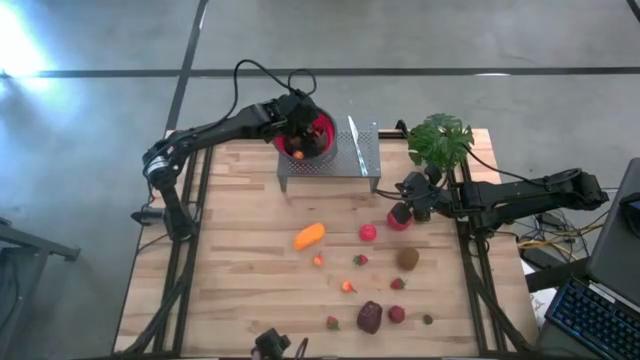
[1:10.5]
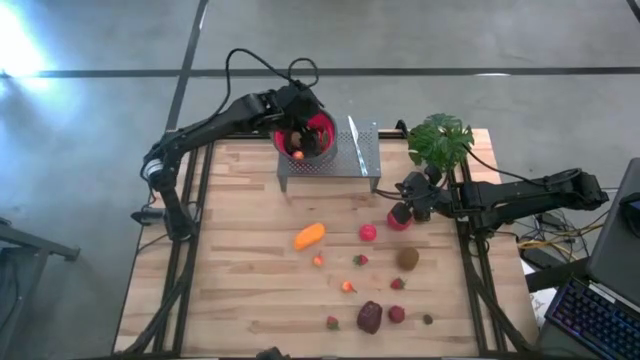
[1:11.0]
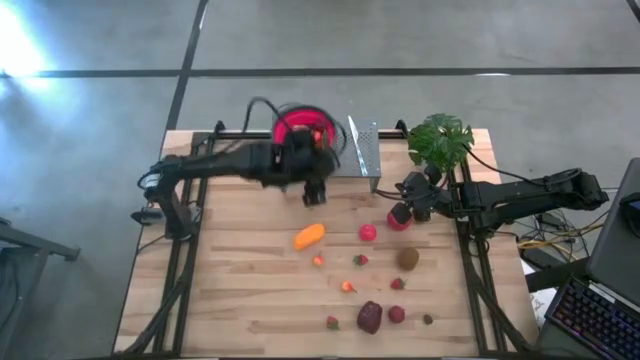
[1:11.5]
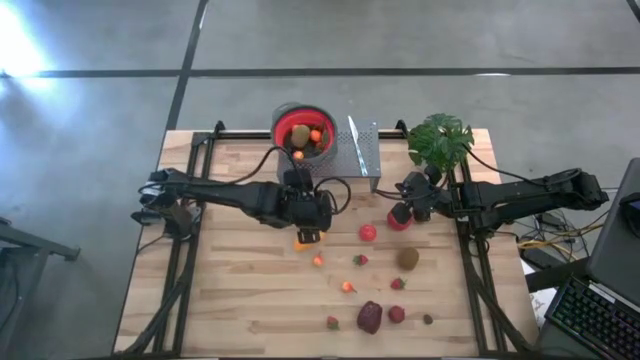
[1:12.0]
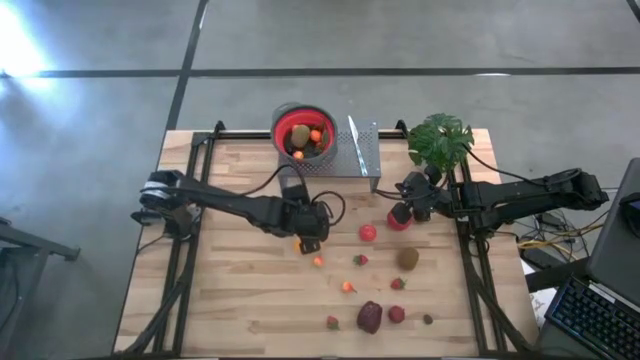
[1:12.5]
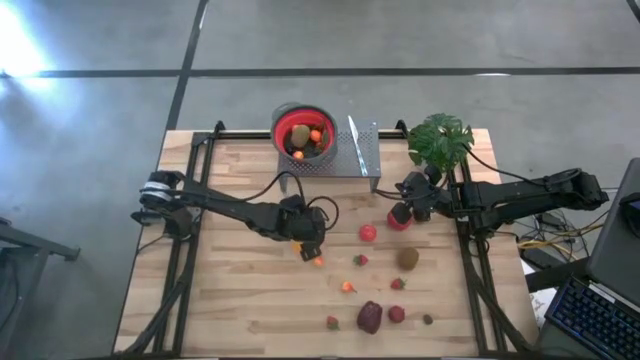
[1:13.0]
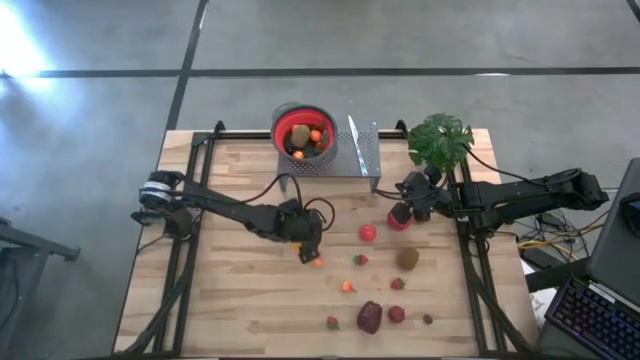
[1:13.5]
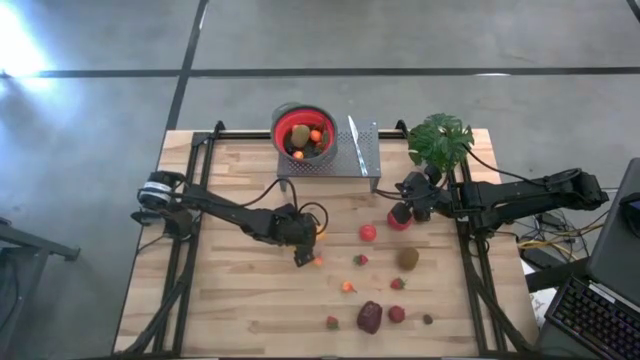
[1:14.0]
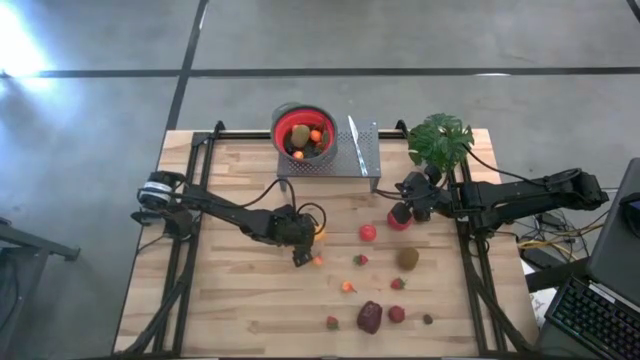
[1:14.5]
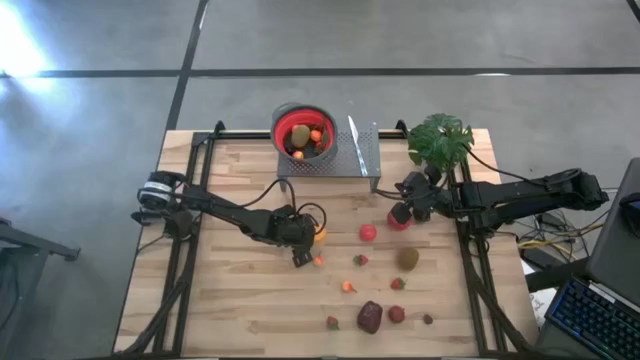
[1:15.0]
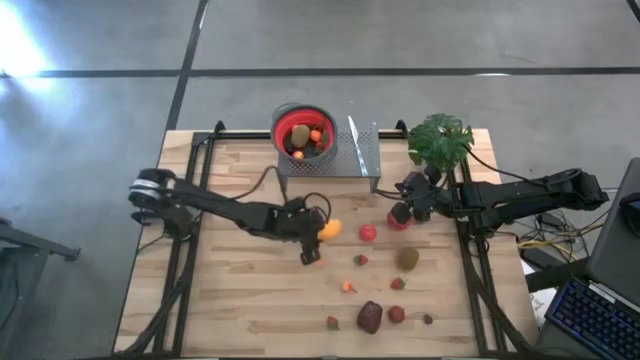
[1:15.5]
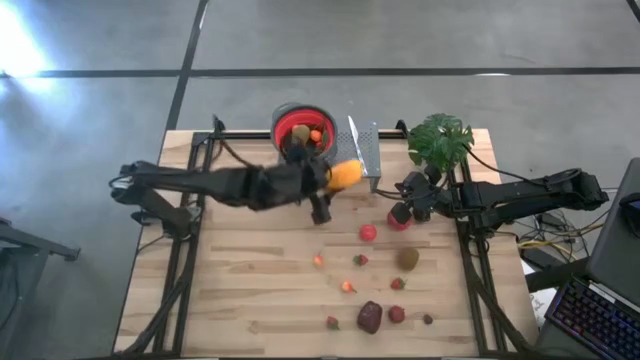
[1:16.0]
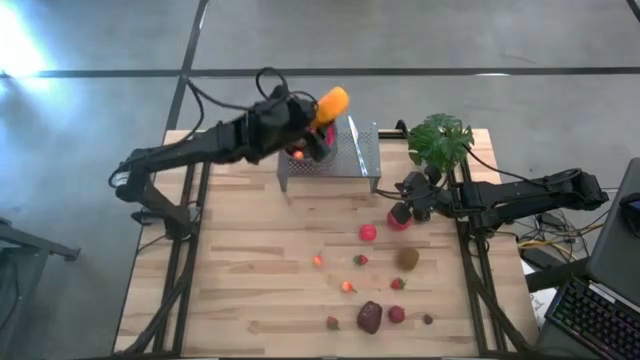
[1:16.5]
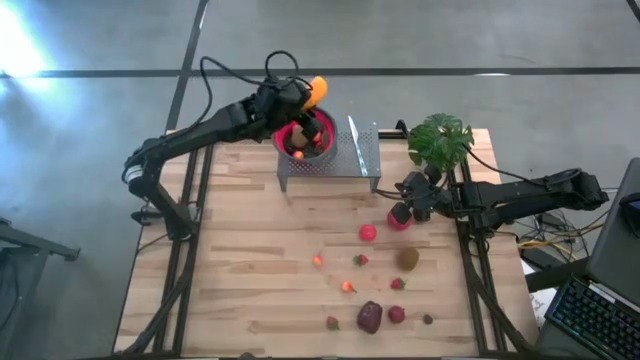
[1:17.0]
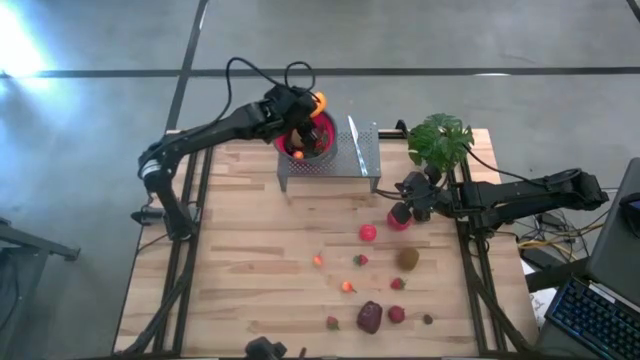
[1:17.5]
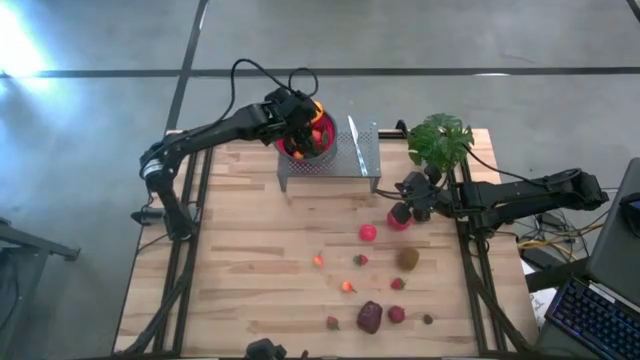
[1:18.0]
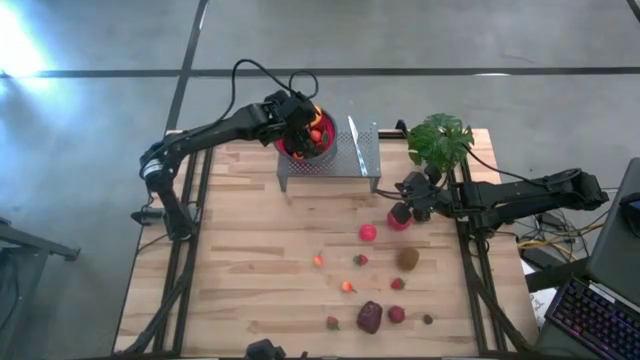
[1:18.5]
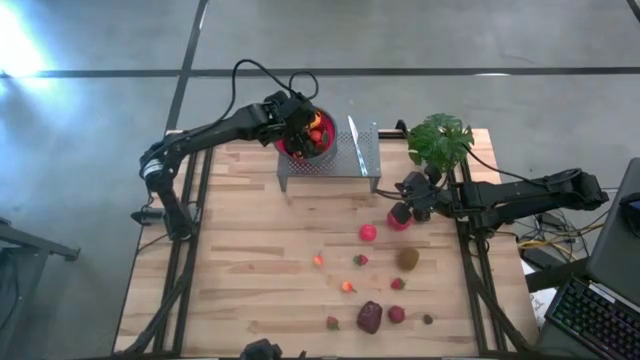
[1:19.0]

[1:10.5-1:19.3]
Task: Pick & Place Fruit
Put the yellow mango into the red strainer bowl on the shelf

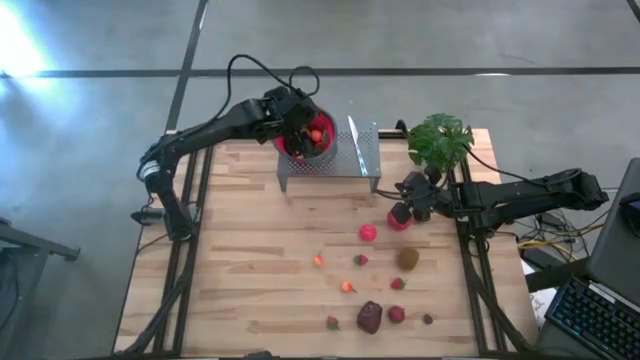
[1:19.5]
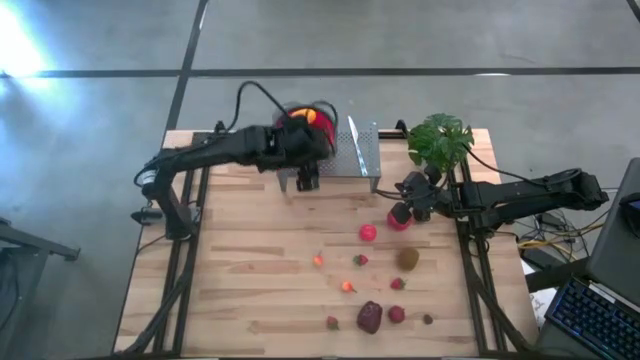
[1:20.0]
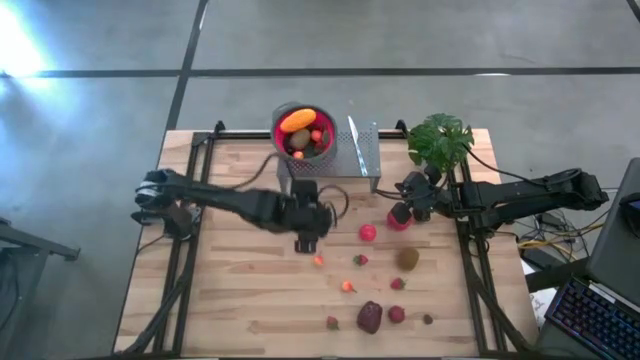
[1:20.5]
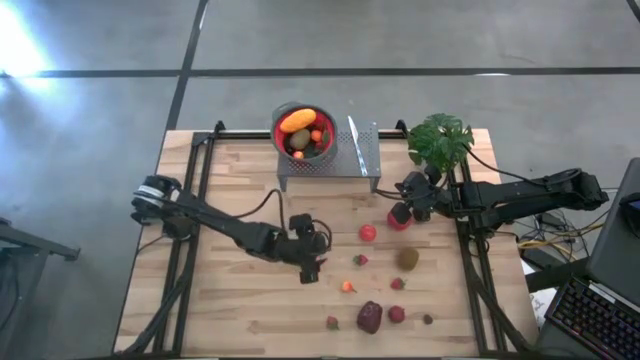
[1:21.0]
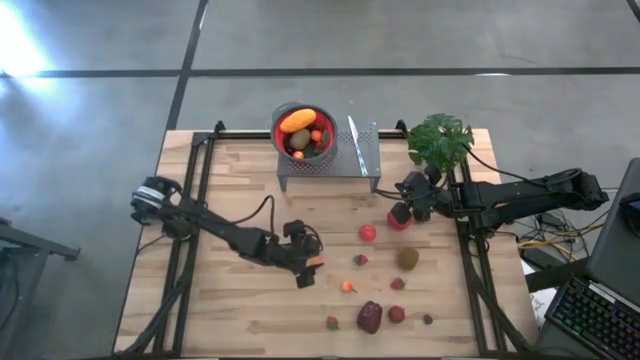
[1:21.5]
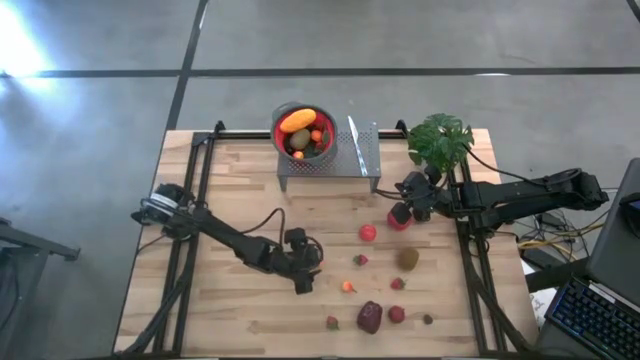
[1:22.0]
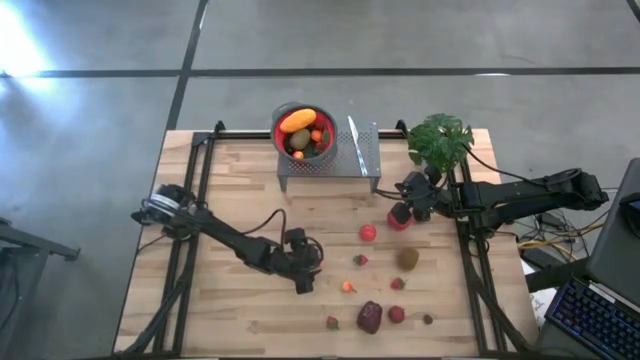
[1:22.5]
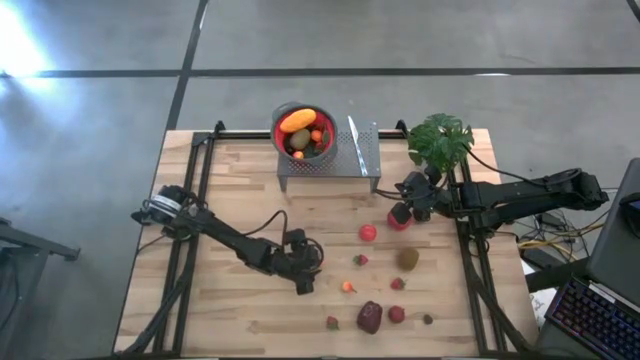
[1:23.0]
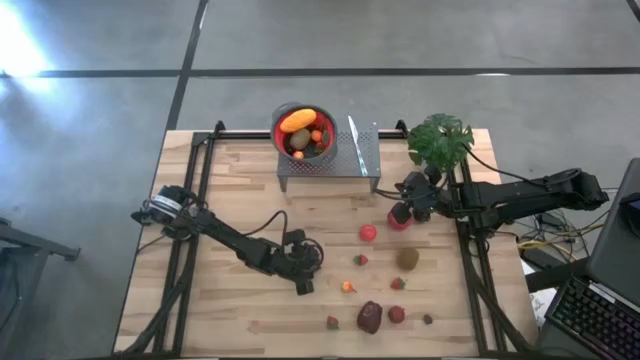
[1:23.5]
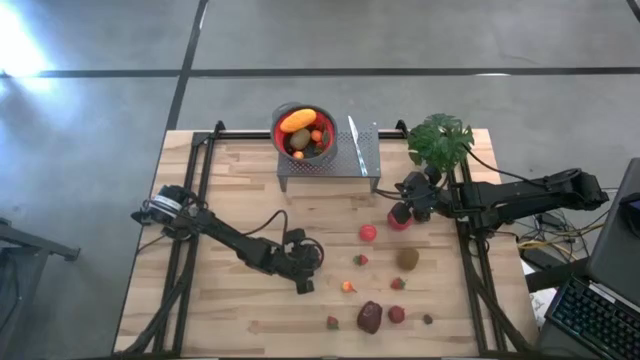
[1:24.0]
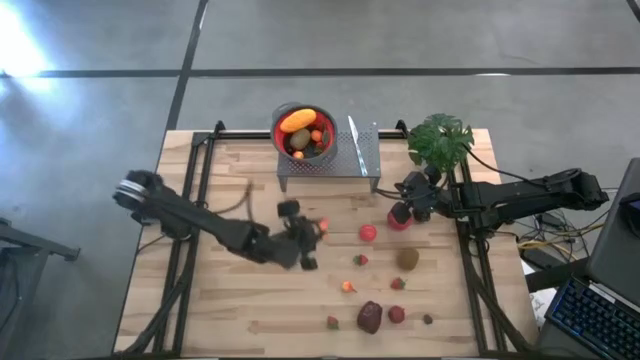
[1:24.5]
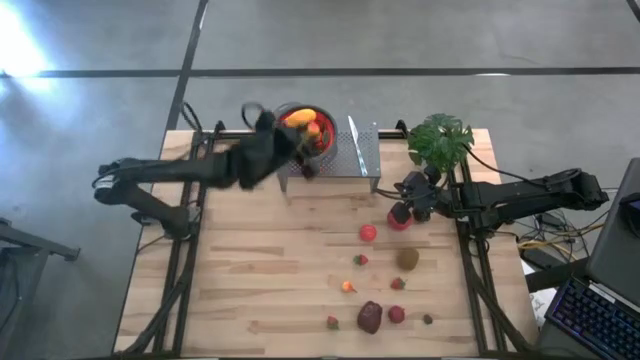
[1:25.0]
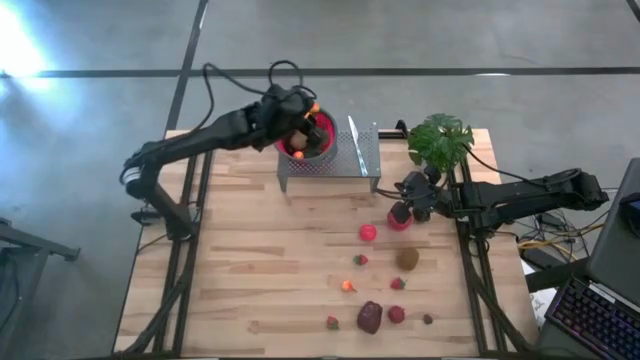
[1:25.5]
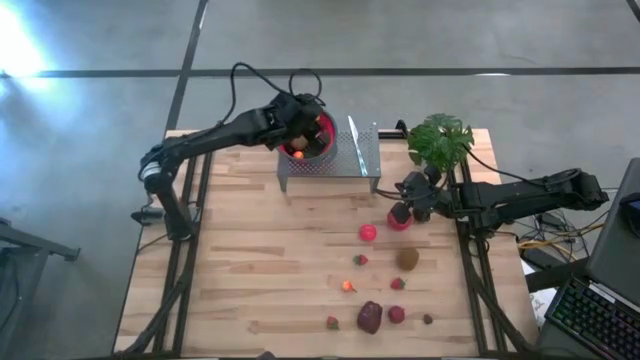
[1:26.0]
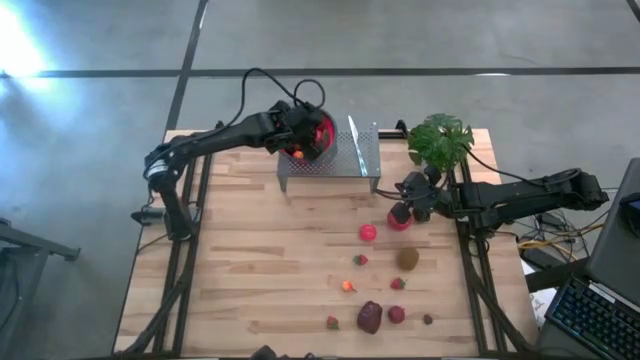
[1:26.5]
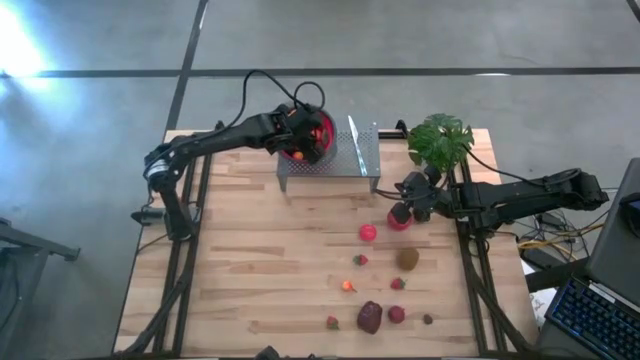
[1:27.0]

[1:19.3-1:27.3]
Put the top yellow pear into the red strainer bowl on the shelf

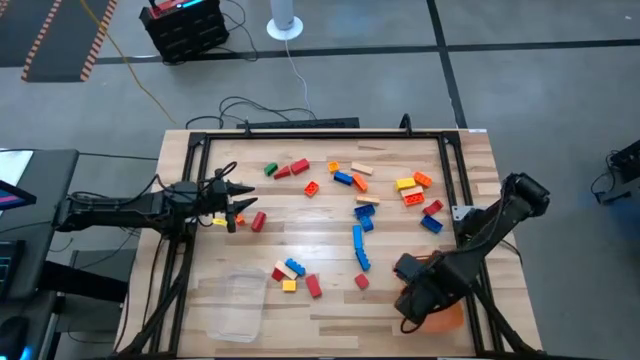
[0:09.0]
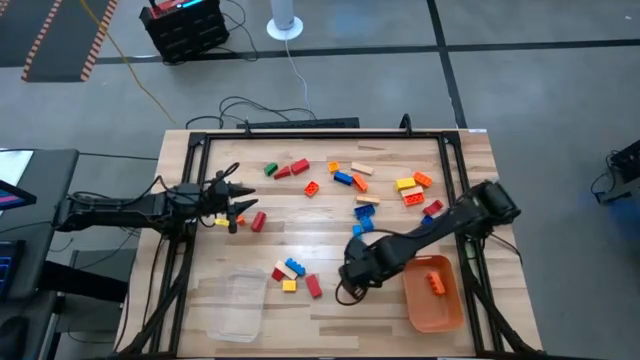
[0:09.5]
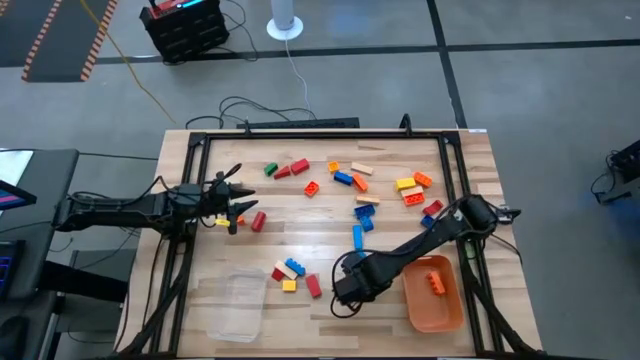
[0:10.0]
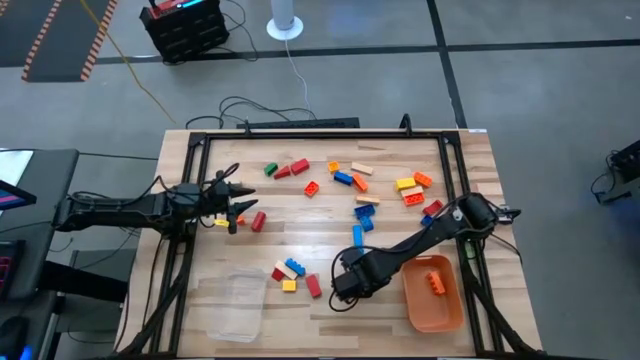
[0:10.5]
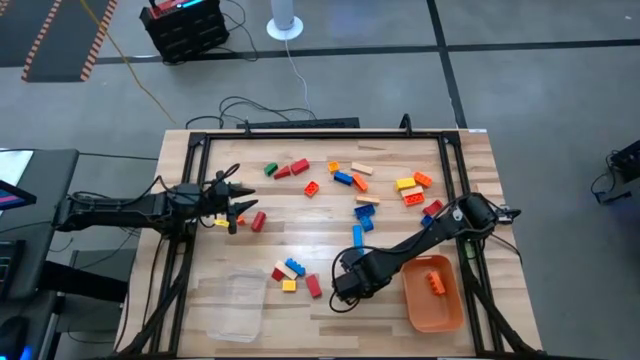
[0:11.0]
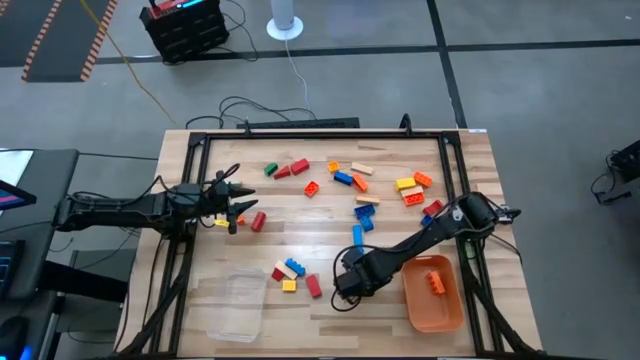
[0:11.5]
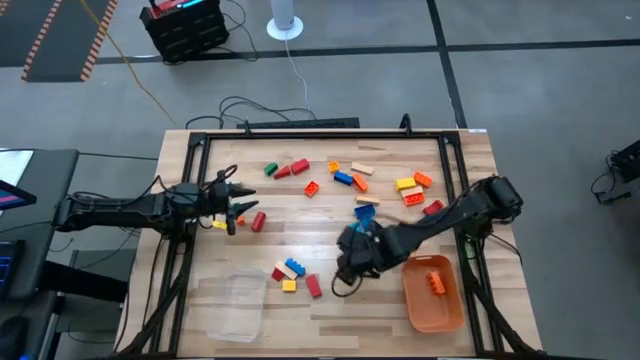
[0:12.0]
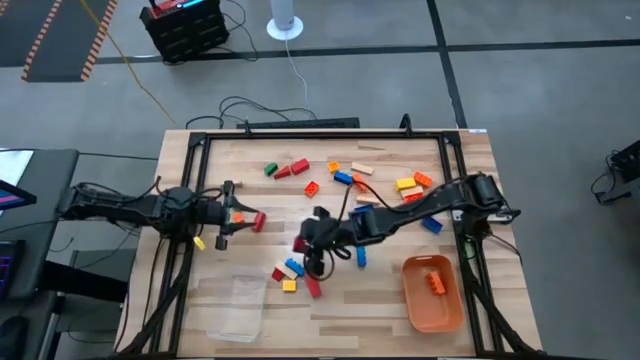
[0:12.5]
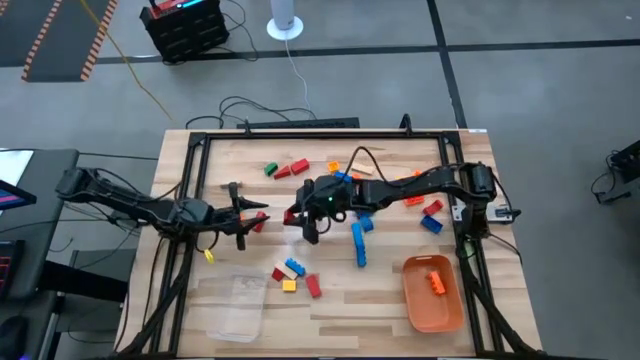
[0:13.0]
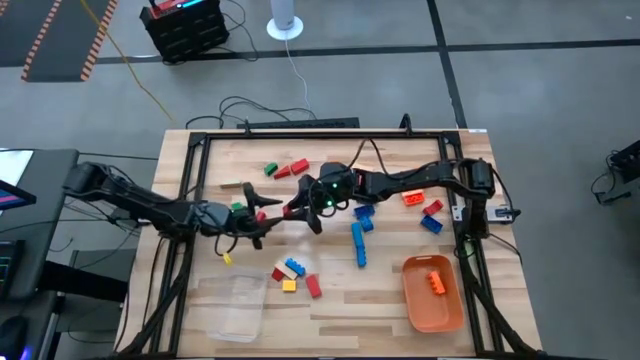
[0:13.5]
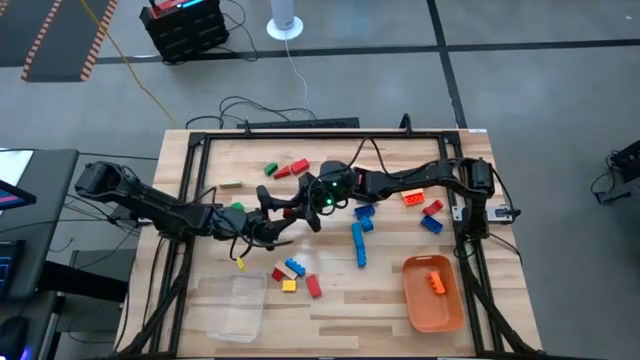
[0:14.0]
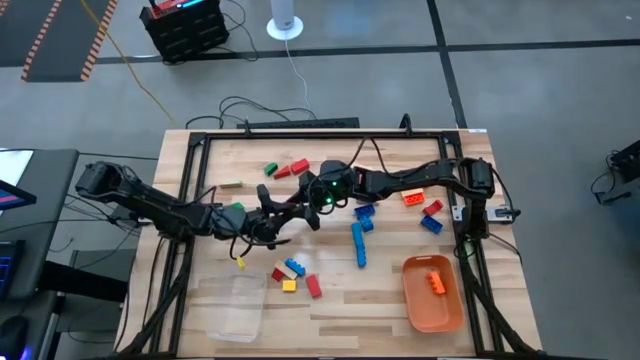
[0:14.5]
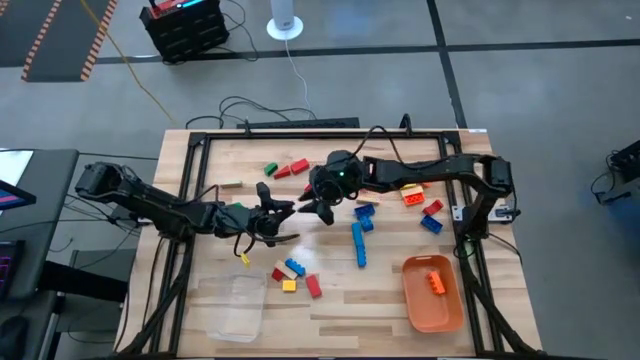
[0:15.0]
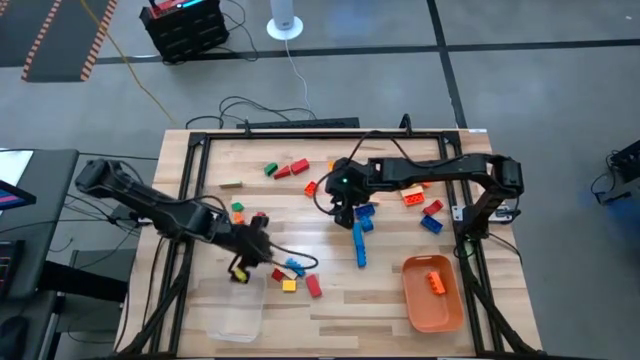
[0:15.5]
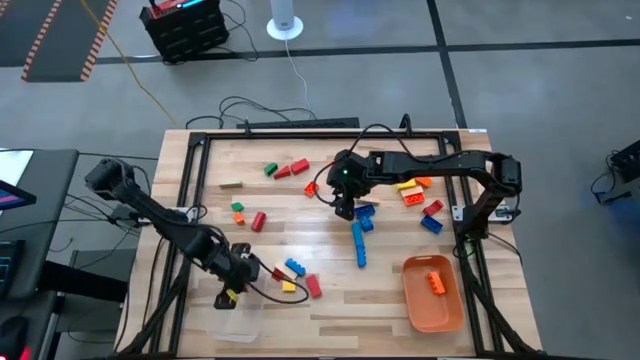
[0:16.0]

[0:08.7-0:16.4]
Task: Sort blocks by size
Put the small red block into the transparent bin
